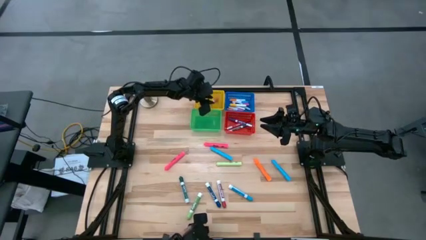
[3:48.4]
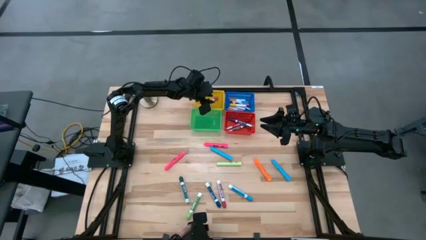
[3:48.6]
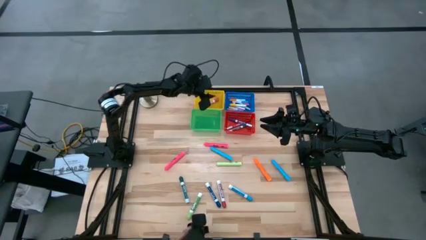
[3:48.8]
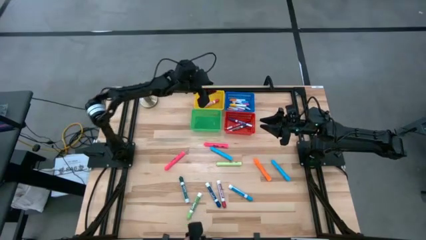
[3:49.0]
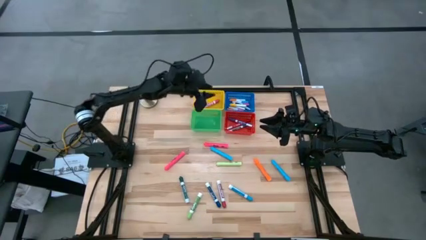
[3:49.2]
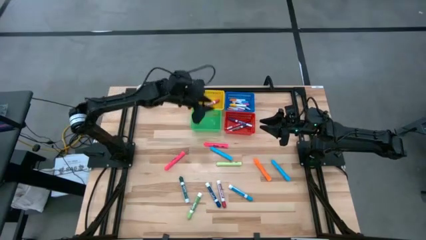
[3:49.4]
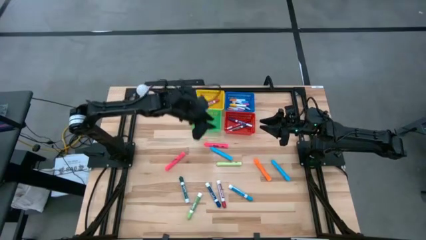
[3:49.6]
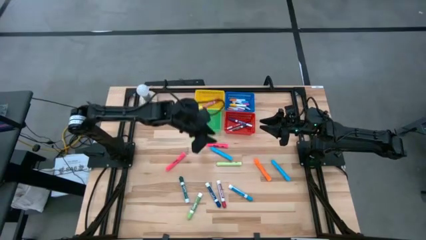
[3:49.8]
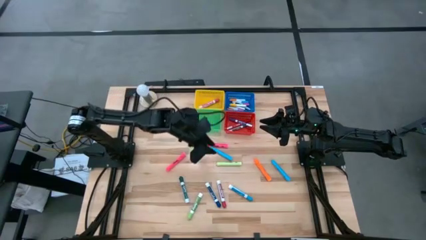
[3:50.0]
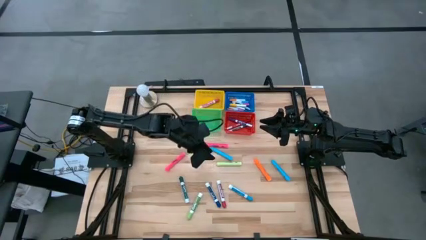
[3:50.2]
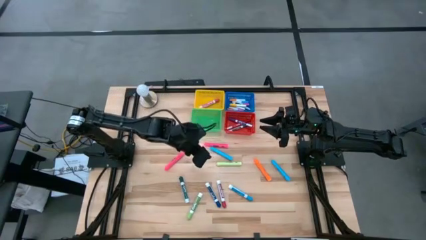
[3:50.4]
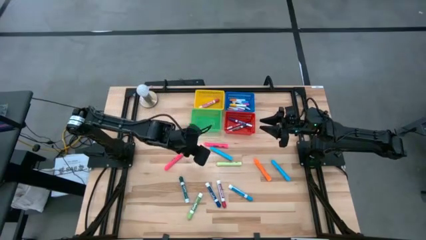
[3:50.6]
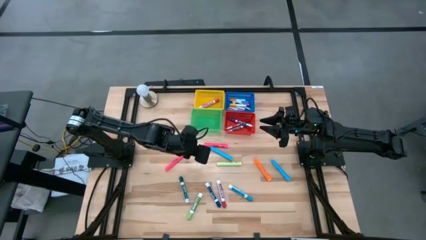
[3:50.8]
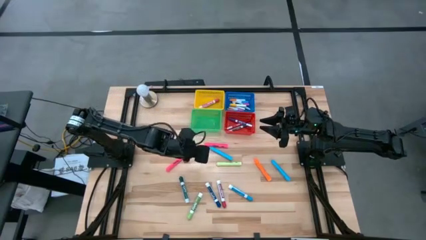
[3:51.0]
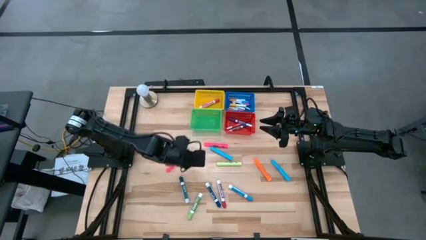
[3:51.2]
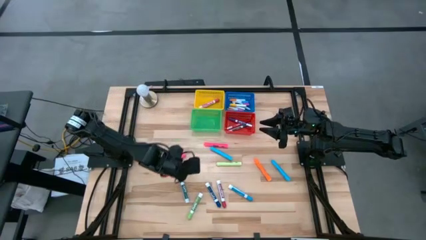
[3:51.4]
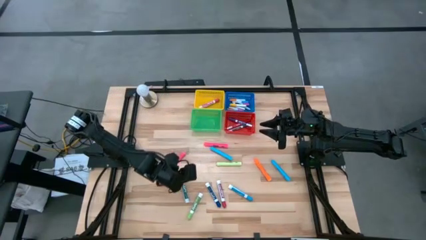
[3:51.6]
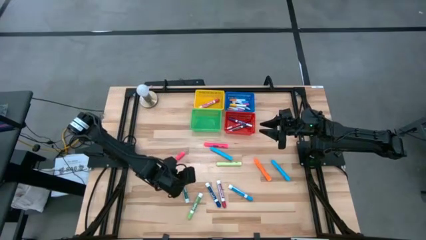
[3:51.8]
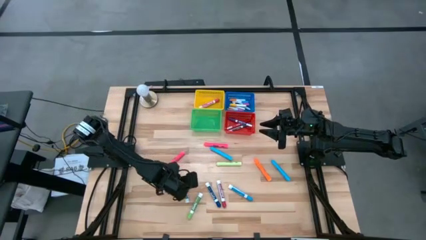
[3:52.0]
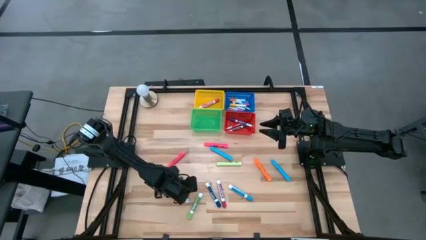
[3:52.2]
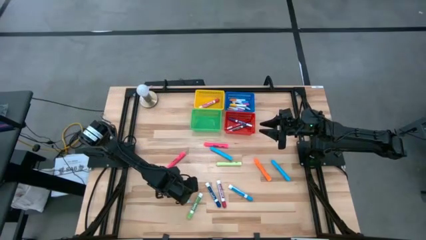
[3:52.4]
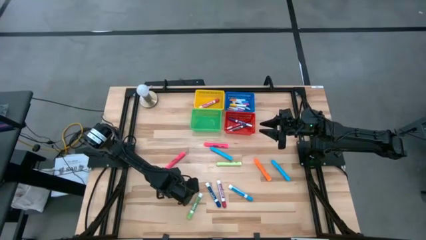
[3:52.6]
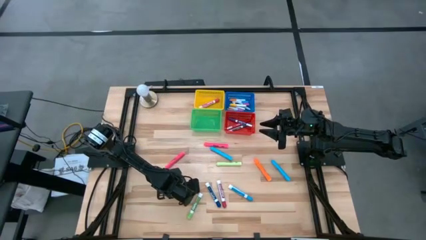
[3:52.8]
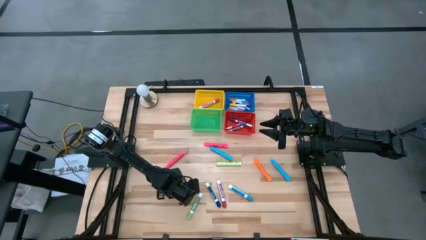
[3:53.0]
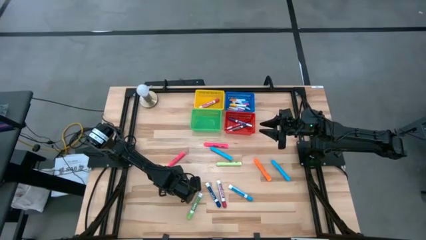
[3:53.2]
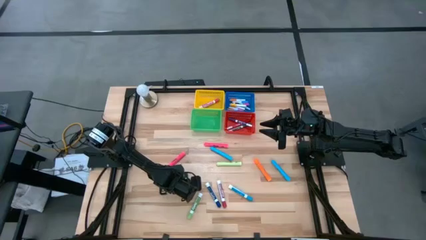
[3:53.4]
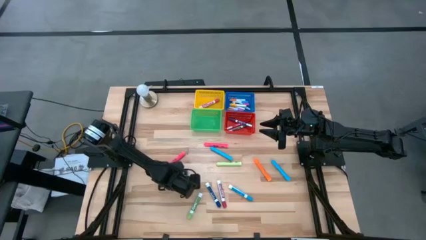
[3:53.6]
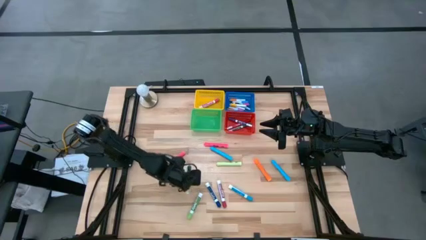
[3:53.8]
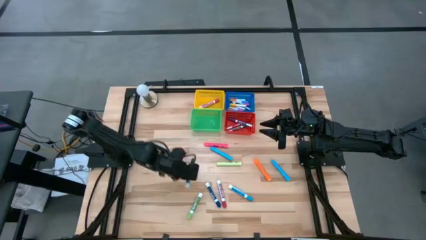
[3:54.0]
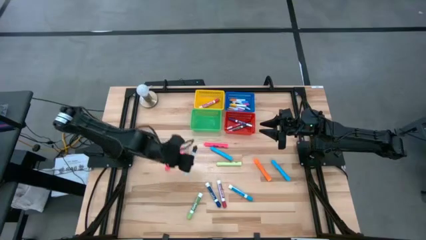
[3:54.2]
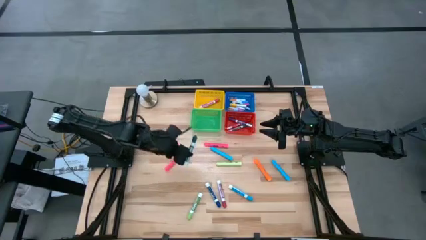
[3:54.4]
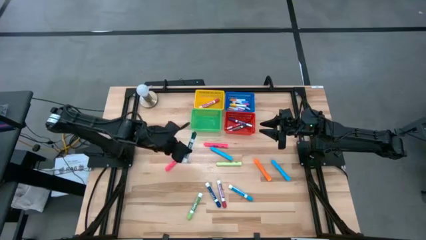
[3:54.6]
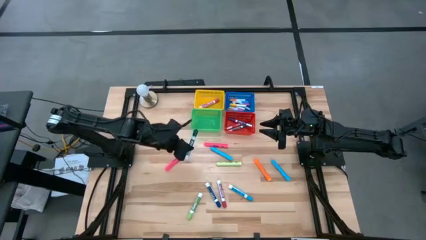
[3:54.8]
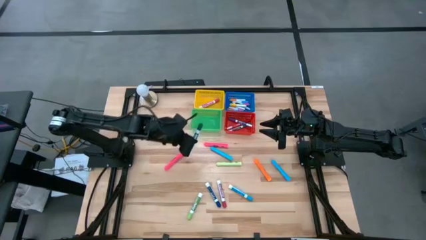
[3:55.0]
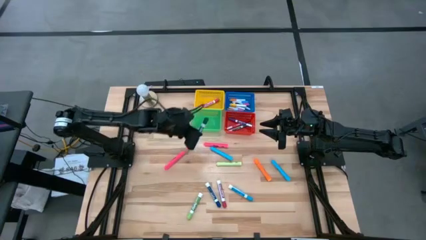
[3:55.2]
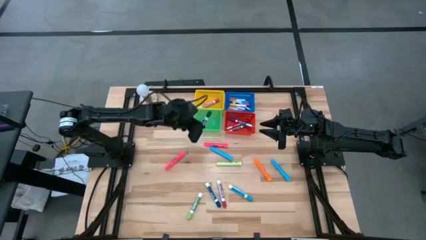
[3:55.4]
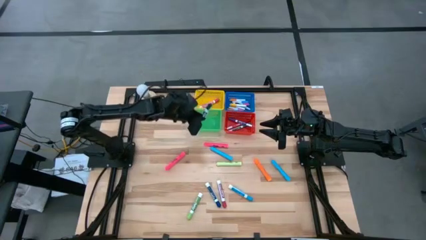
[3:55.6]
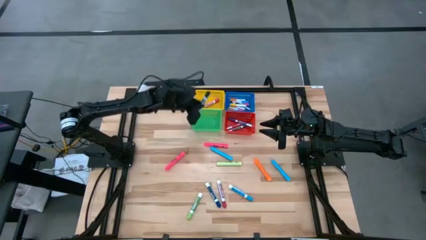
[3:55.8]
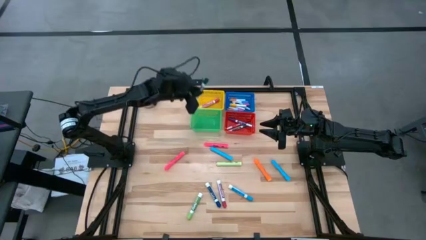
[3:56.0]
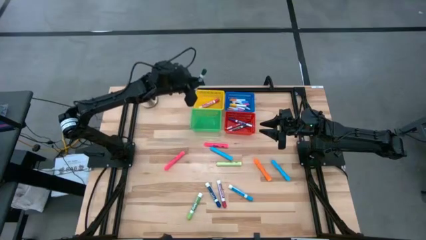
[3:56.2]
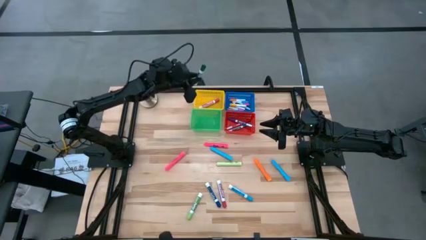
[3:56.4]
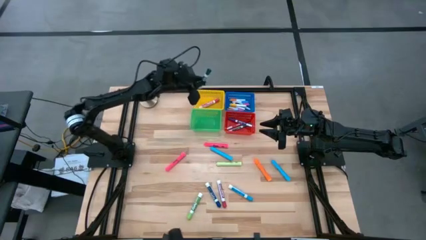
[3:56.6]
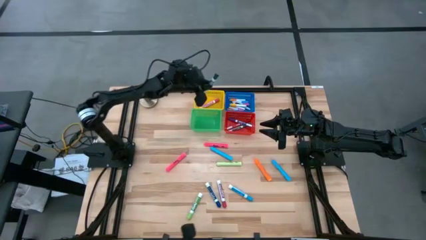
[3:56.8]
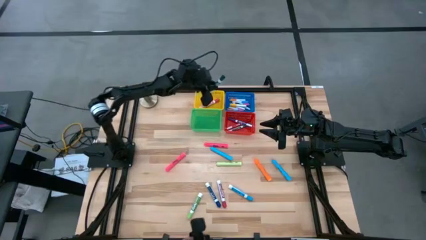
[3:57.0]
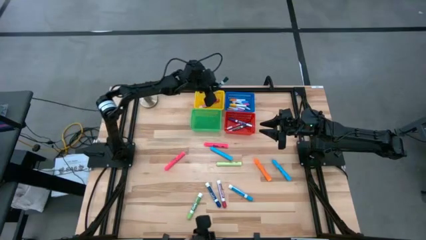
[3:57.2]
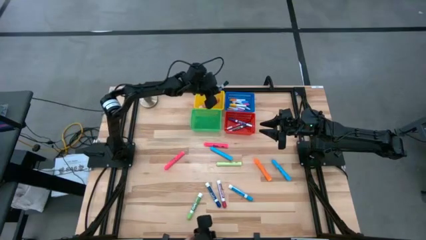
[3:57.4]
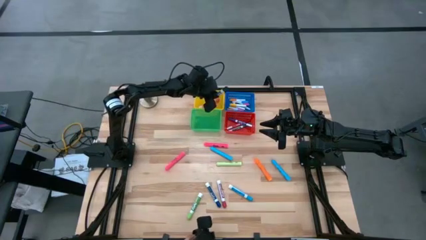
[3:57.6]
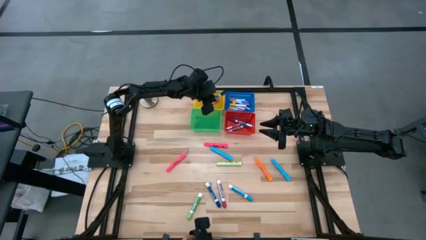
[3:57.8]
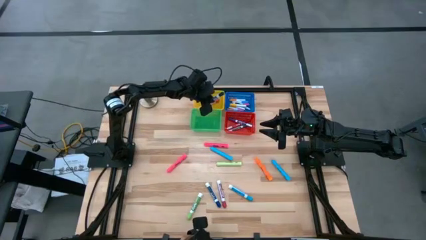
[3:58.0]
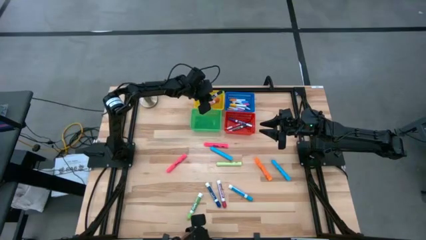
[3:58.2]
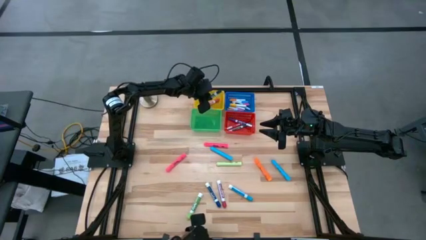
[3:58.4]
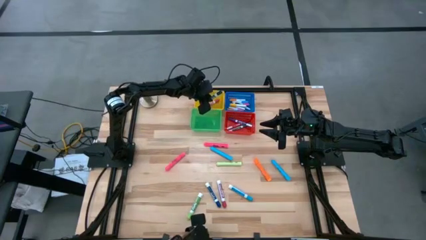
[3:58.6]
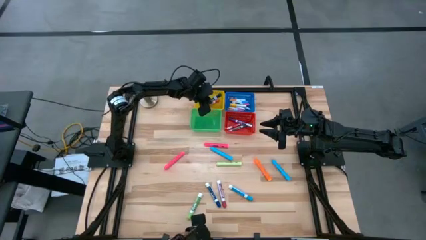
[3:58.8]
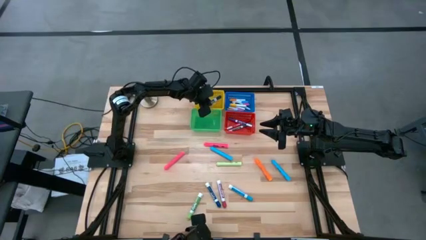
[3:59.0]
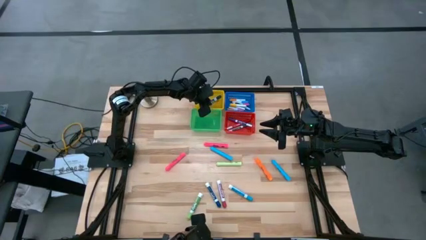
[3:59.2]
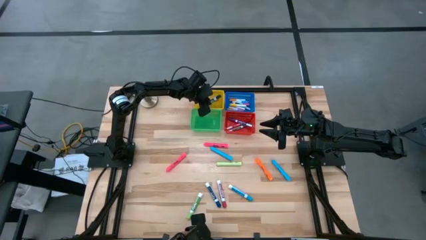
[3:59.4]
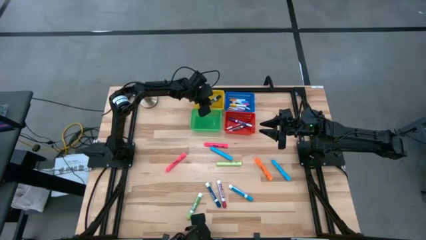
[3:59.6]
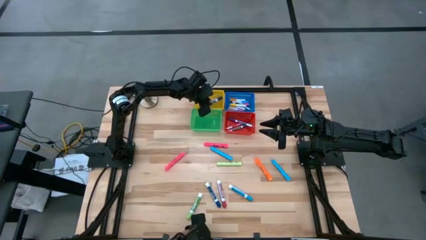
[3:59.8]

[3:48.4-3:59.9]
Task: Pick & Place Markers
Put the large dark green marker pen into the yellow bin
